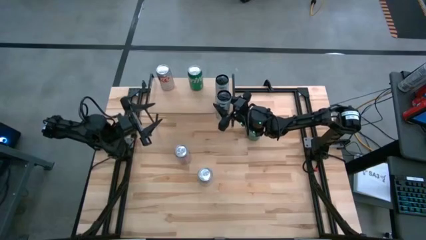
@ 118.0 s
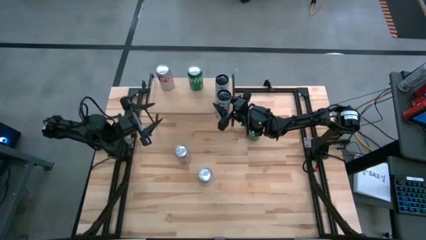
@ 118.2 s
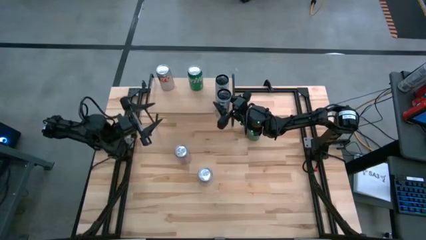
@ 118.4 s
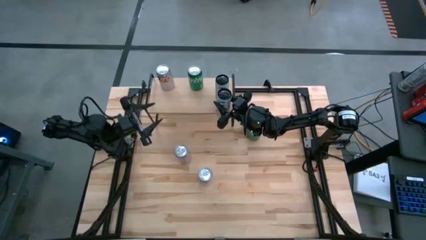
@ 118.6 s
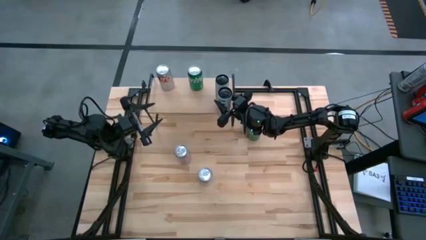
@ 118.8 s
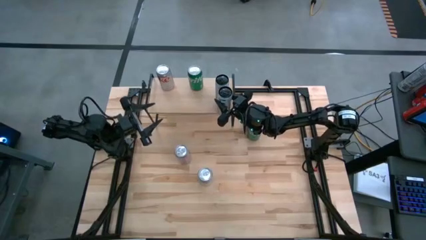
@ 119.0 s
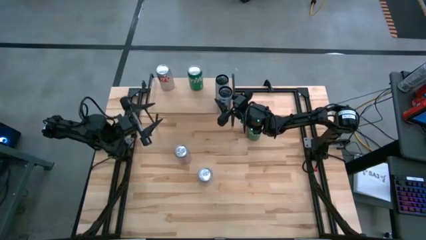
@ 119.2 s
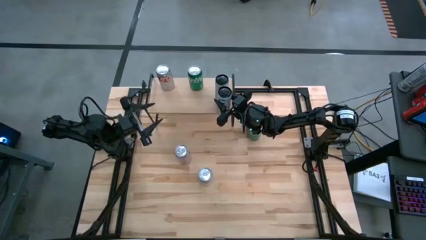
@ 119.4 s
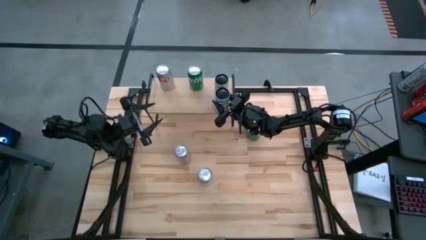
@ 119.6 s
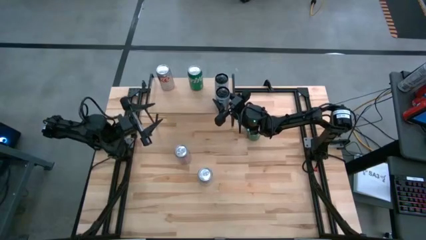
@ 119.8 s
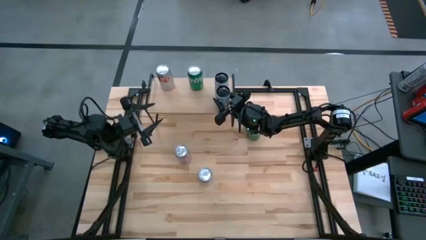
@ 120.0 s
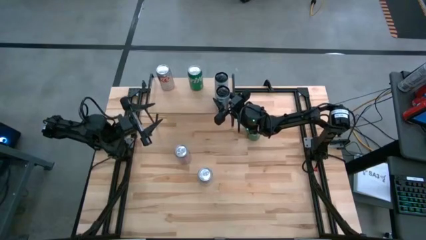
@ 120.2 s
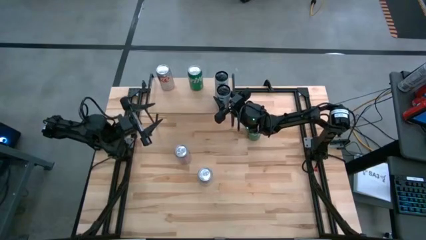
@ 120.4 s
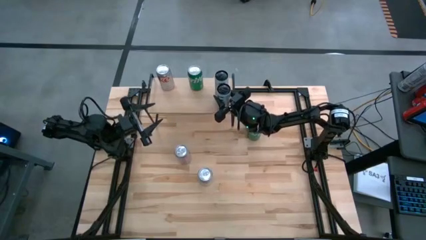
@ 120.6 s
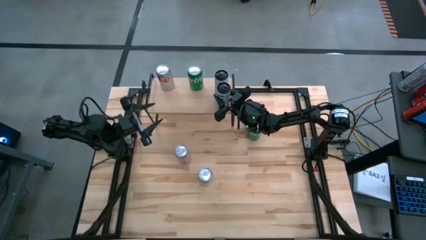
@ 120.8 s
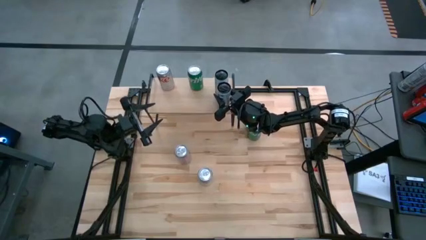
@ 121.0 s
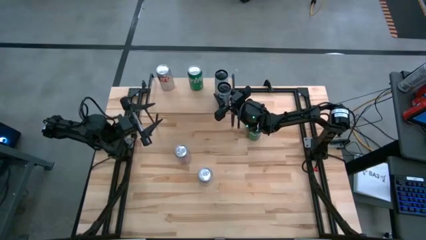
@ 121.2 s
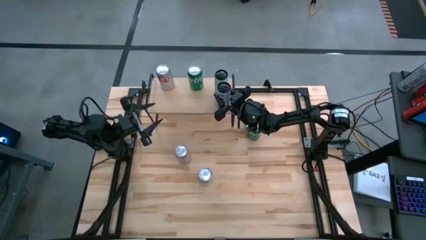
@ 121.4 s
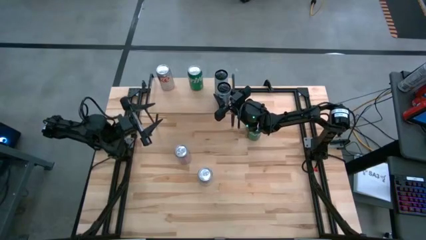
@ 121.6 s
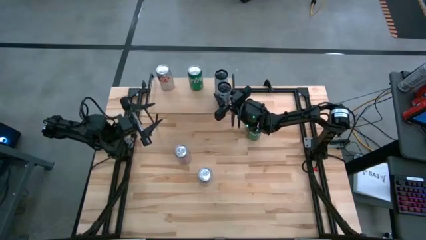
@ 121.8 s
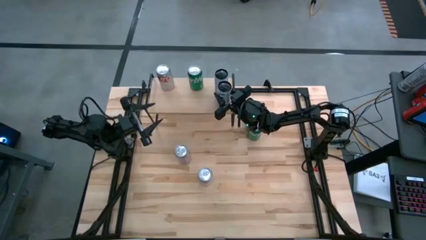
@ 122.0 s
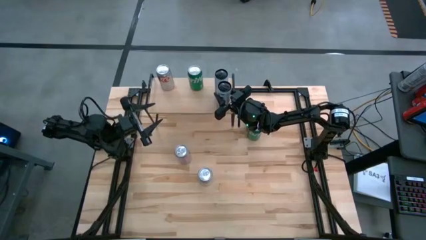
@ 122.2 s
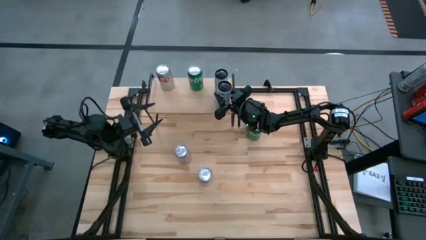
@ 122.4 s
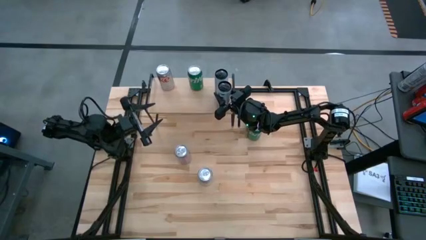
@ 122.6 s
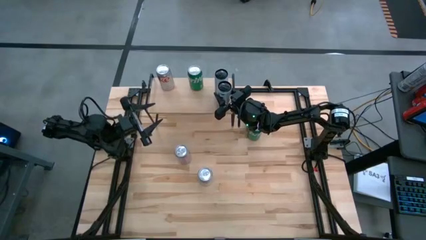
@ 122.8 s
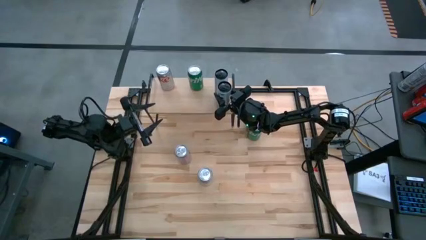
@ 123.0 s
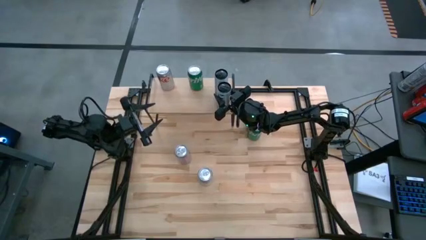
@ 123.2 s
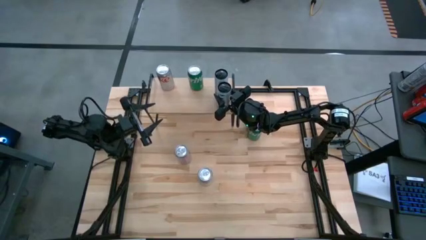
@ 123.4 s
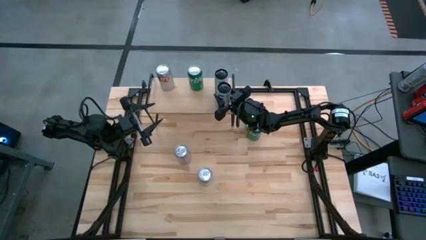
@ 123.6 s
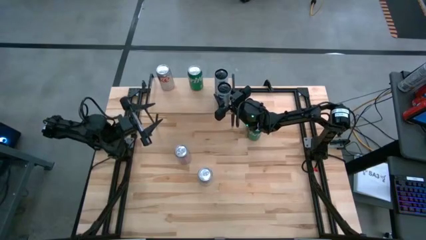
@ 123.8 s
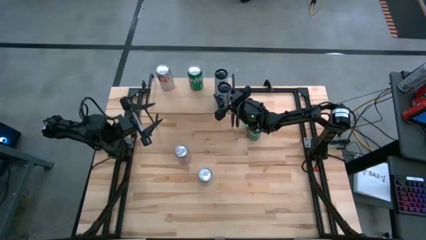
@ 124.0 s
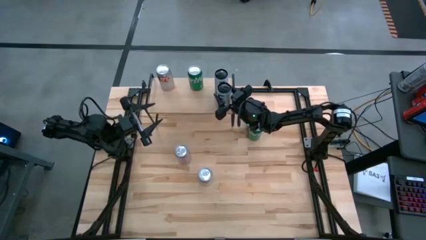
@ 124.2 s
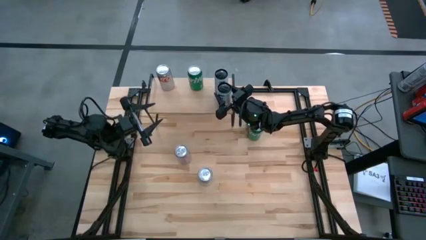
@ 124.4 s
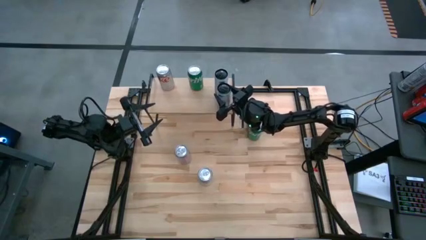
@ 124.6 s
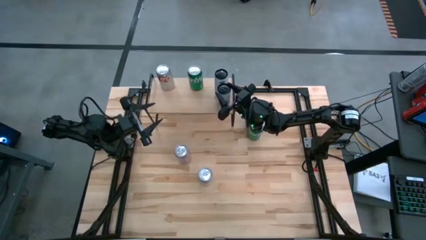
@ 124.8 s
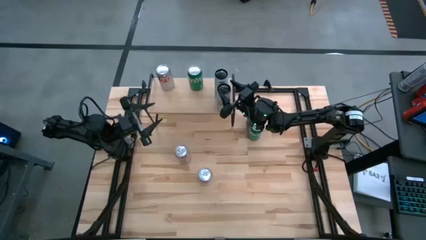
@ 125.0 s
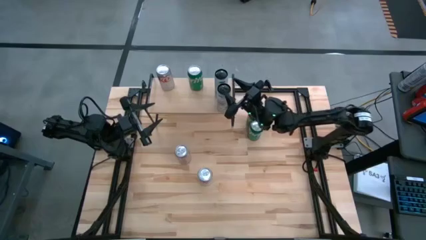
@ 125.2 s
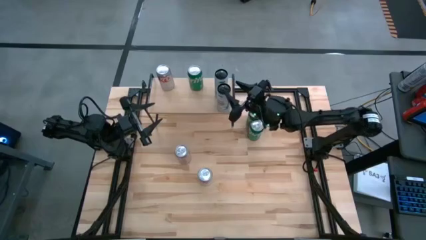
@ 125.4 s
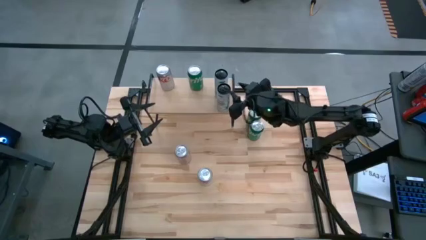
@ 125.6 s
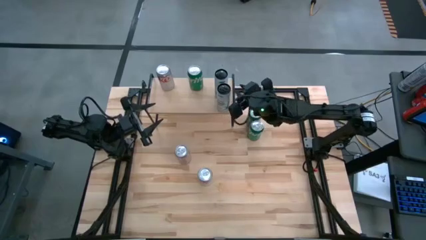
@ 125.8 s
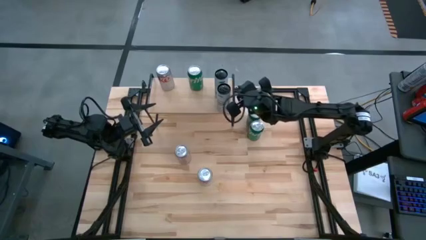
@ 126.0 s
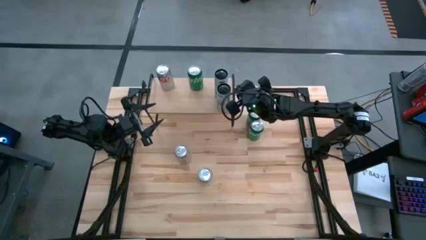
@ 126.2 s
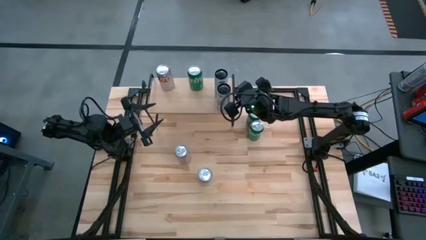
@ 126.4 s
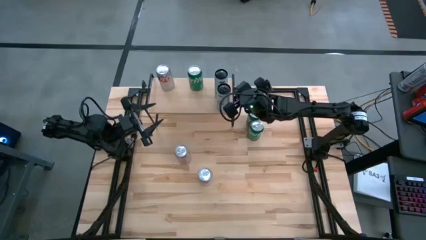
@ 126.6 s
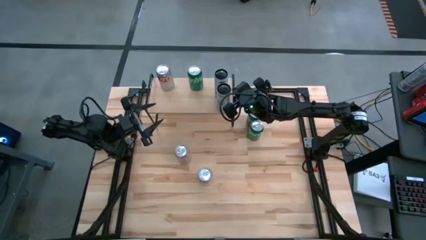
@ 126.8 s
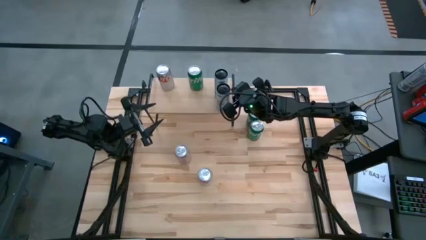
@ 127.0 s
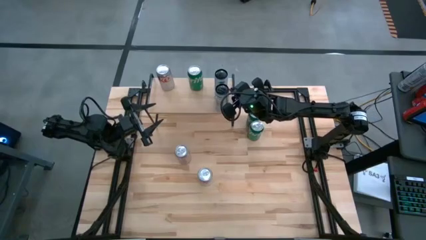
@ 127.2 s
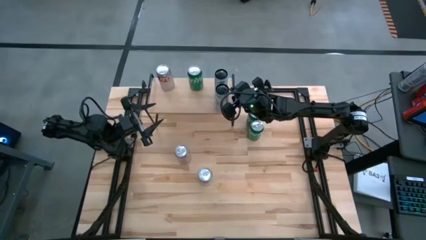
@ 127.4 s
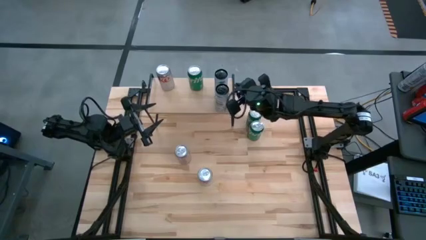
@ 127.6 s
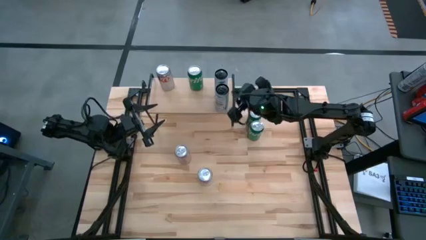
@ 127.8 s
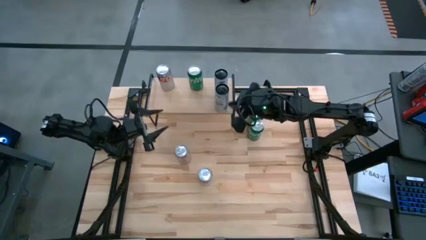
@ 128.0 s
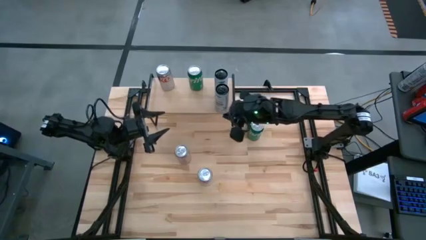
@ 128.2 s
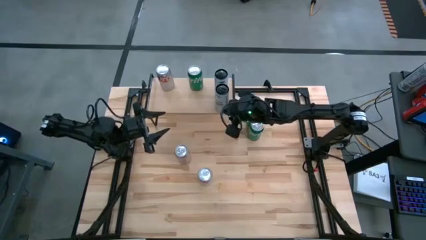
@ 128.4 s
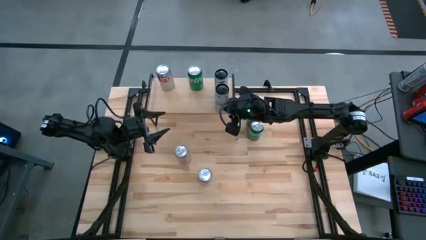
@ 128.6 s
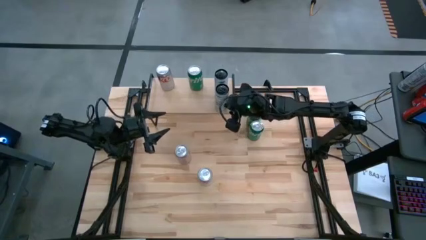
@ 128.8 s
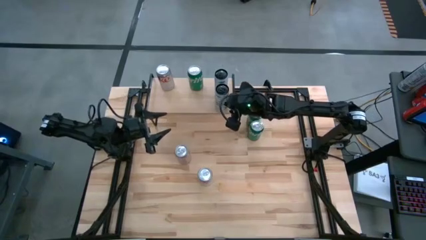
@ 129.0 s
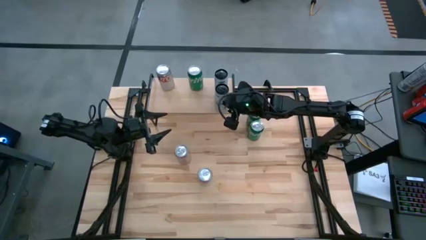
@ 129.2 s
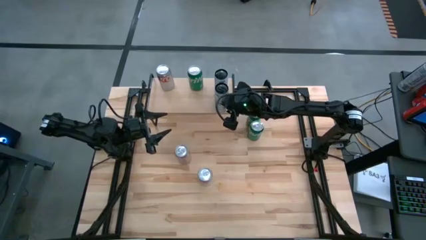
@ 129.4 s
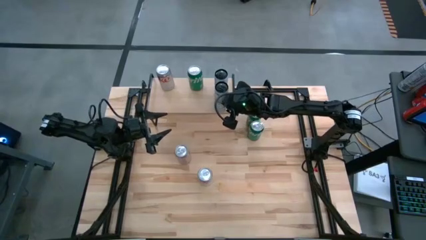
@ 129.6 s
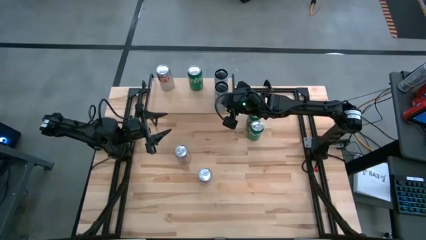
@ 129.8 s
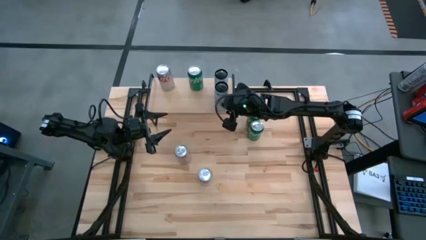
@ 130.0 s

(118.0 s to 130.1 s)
Task: Place canned beverage on shelf
Put the white-blue soda can aligned with the other white-blue soda can on the shelf

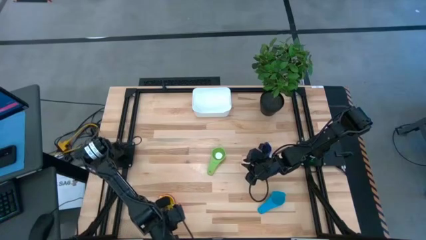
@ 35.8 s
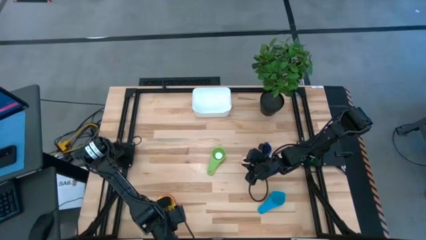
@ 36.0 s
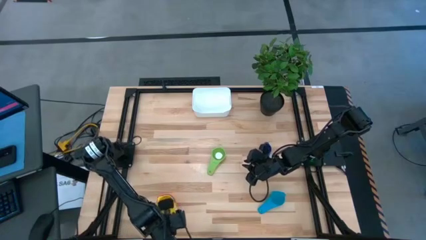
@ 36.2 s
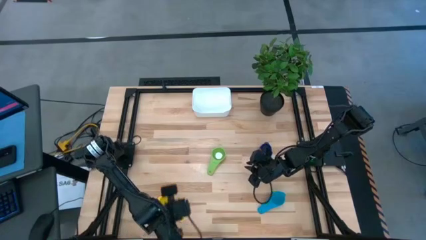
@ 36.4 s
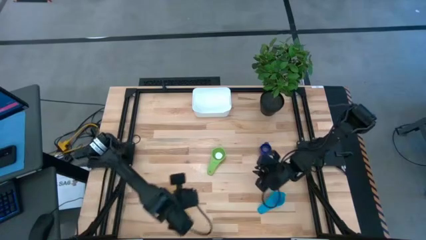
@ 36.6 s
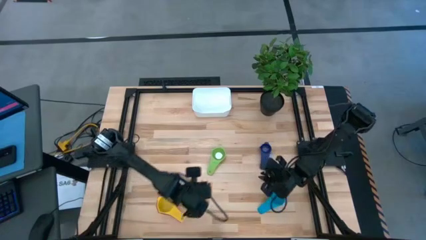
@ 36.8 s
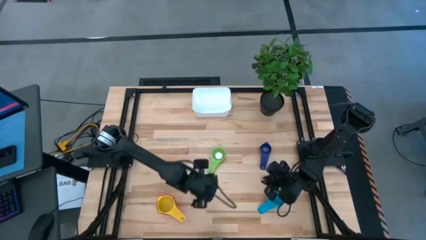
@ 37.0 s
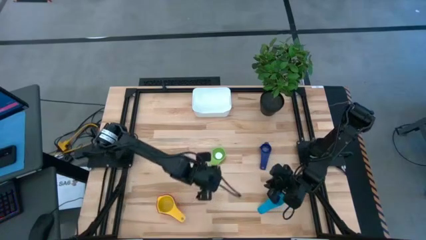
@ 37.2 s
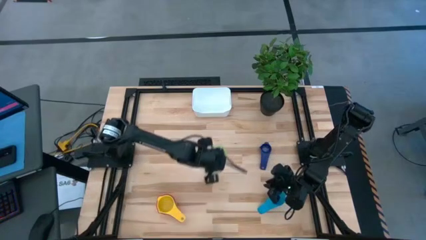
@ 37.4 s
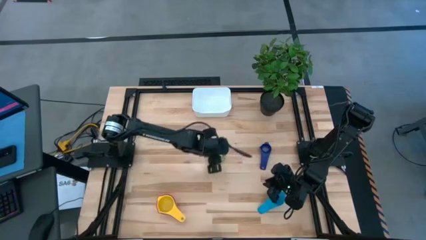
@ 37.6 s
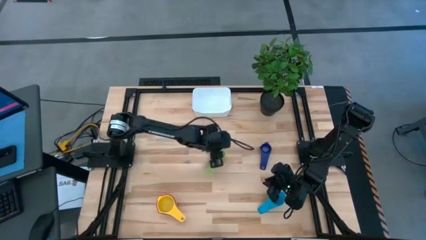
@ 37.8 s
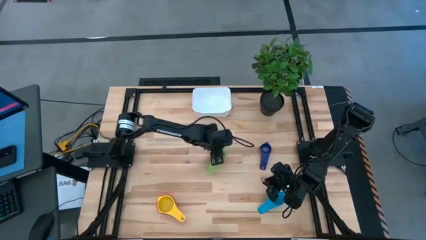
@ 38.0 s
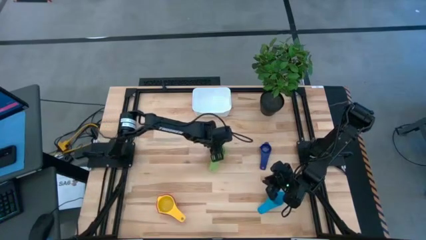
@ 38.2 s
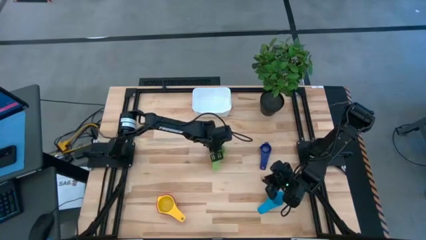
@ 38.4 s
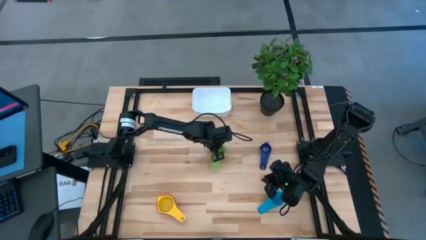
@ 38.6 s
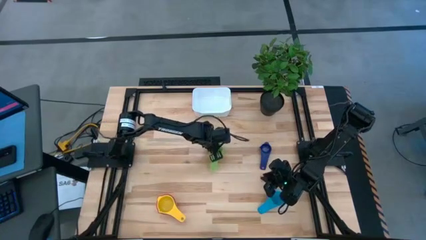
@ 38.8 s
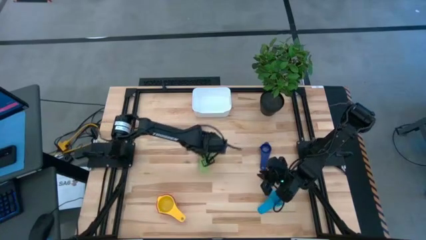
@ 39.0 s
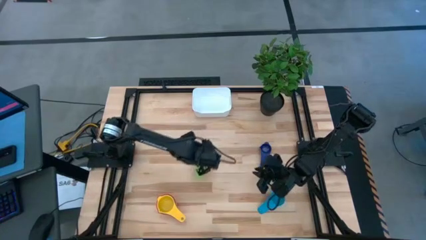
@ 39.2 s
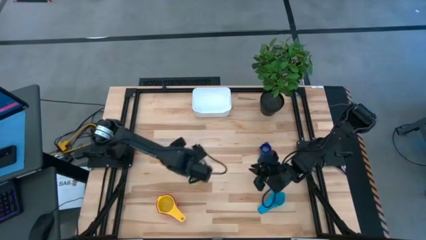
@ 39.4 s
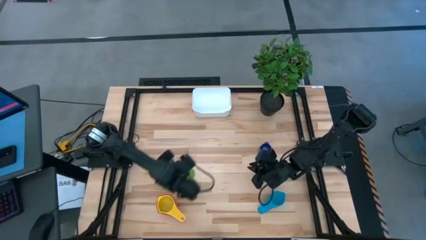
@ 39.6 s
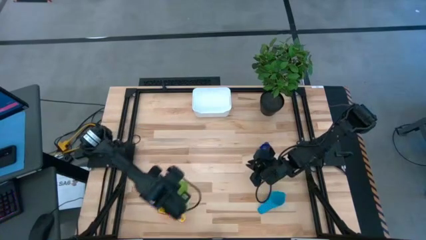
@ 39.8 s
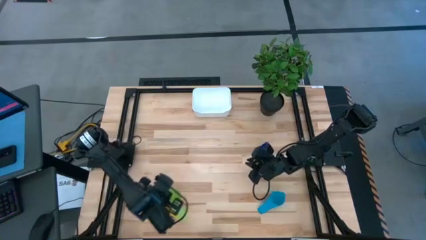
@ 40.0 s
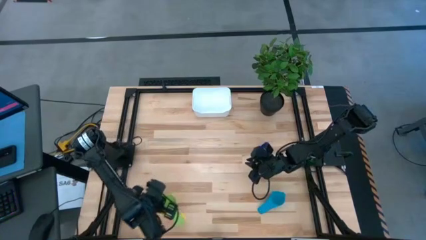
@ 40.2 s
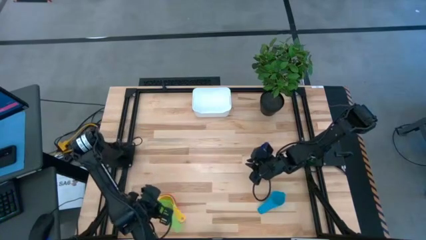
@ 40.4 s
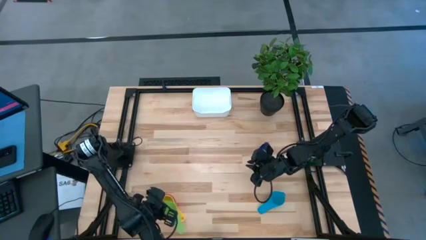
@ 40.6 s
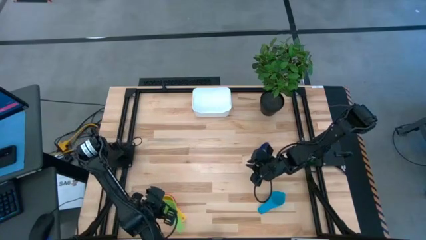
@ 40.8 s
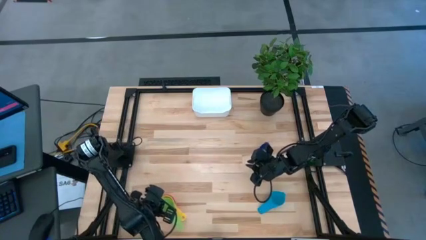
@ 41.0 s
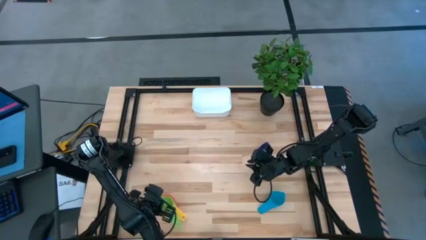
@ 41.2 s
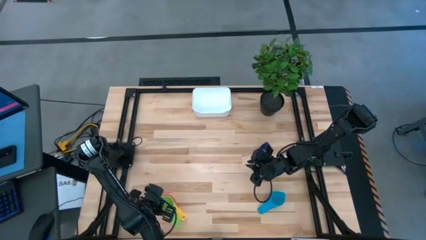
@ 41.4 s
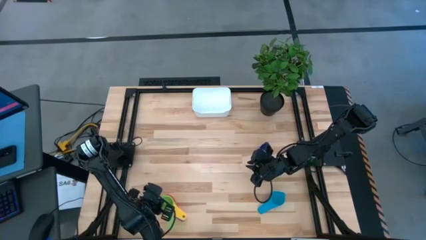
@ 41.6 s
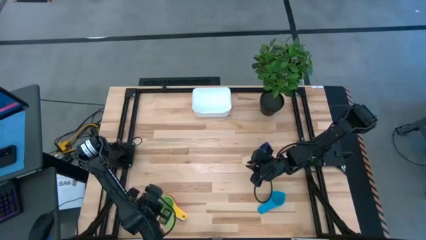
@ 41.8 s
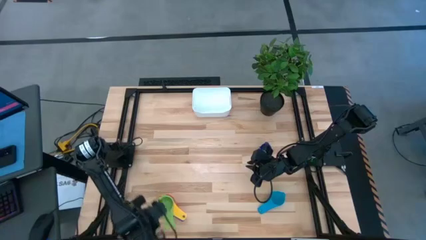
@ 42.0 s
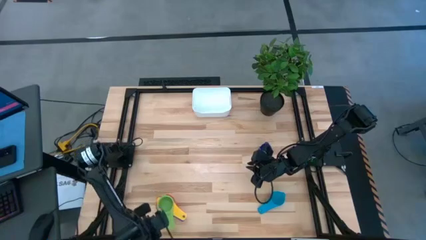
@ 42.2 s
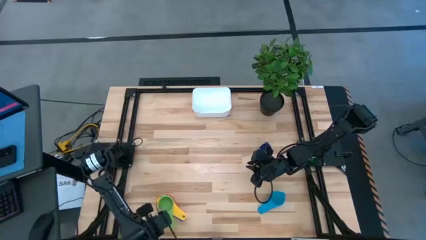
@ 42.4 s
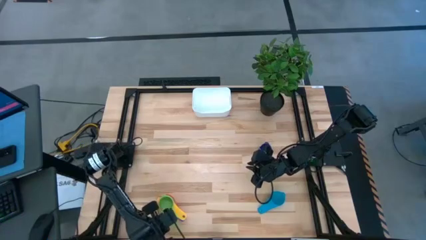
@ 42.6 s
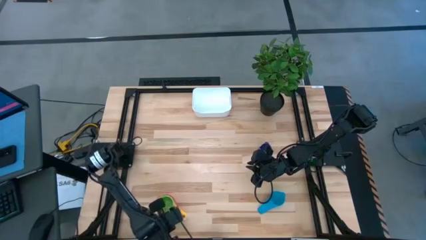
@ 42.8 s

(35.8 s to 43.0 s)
Task: Nest measuring cups in basket
Stack the green measuring cup into the yellow measuring cup
